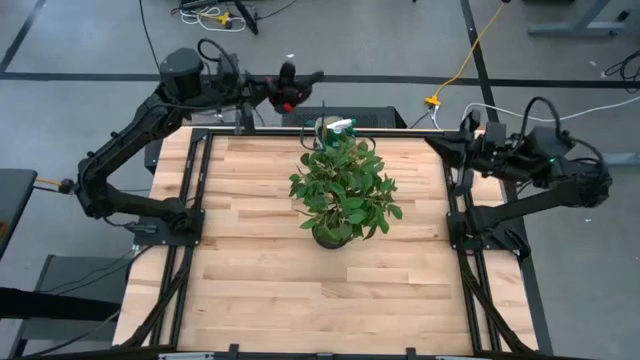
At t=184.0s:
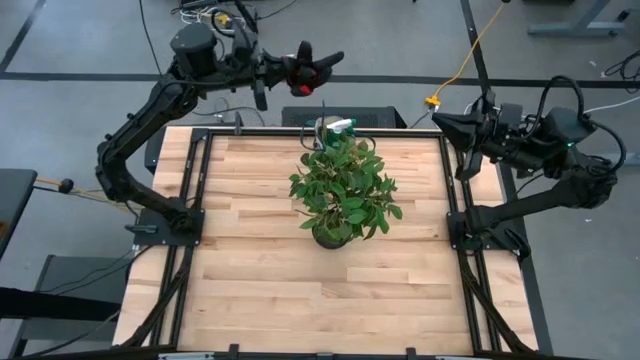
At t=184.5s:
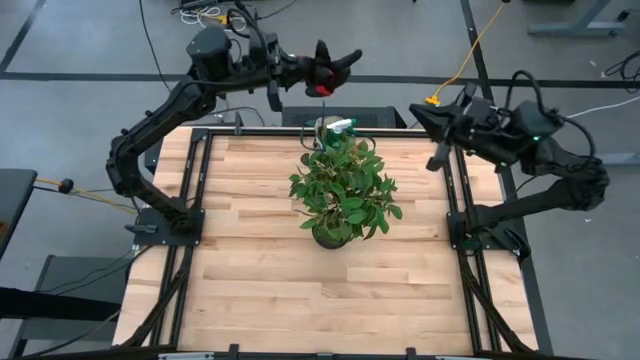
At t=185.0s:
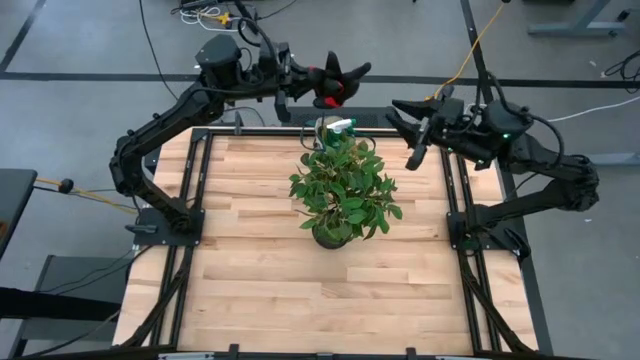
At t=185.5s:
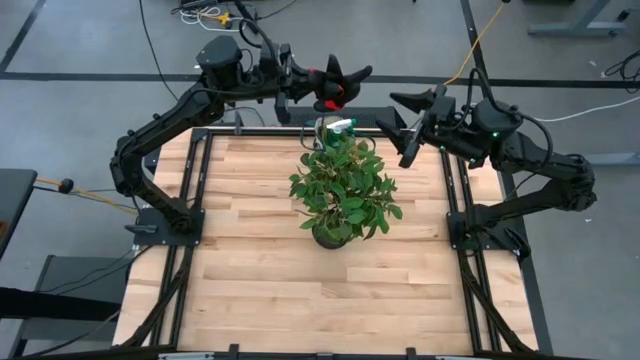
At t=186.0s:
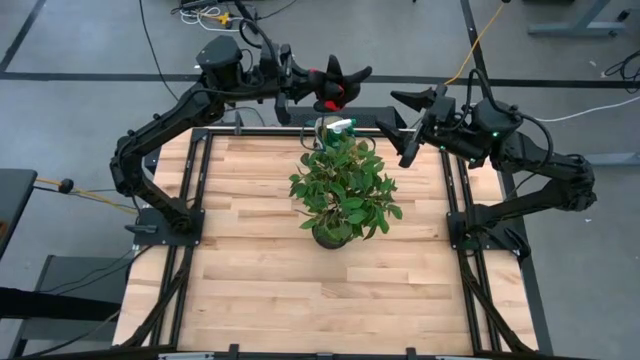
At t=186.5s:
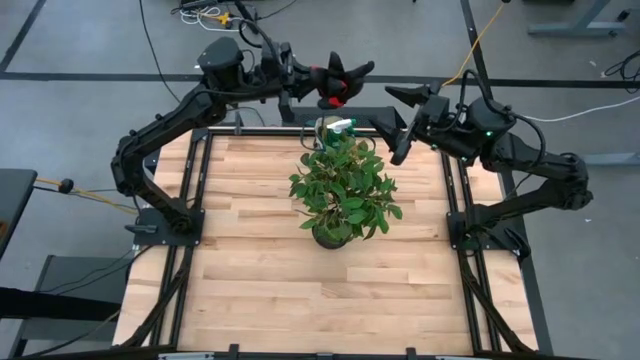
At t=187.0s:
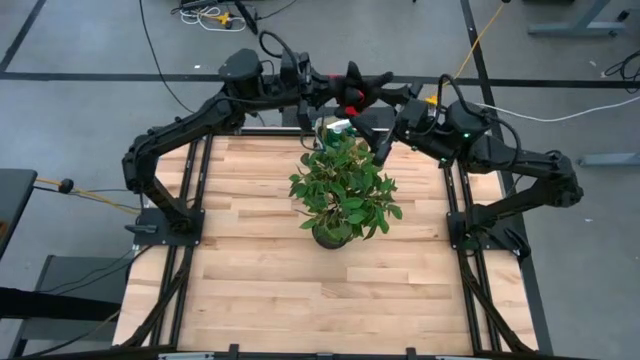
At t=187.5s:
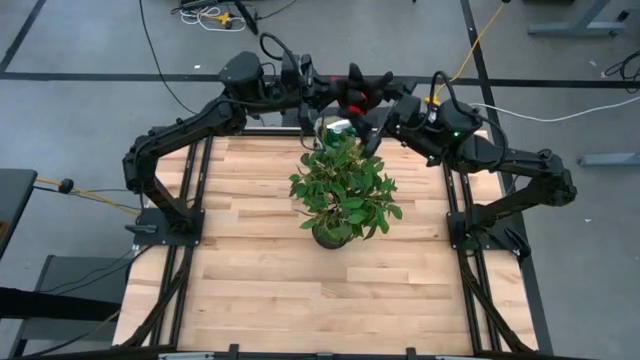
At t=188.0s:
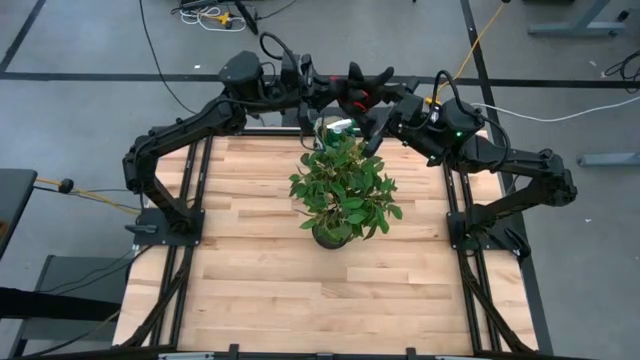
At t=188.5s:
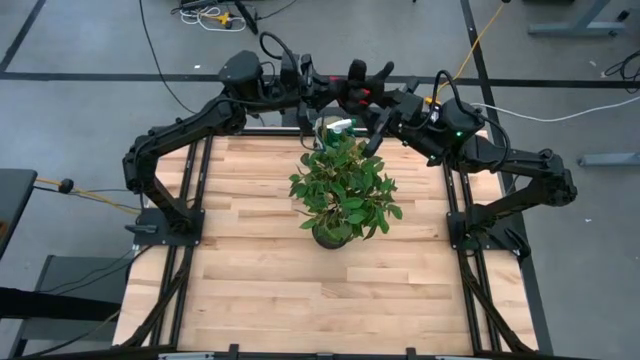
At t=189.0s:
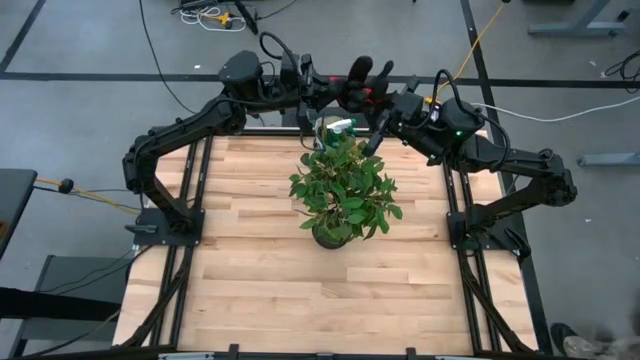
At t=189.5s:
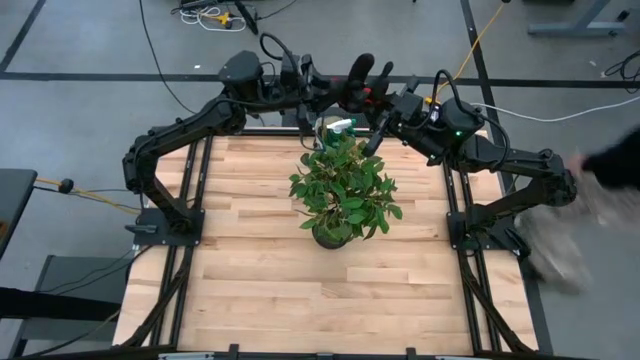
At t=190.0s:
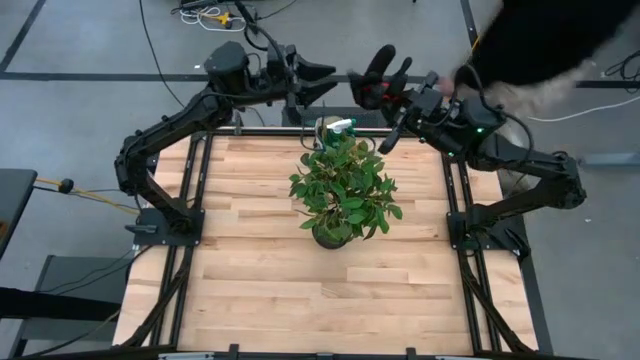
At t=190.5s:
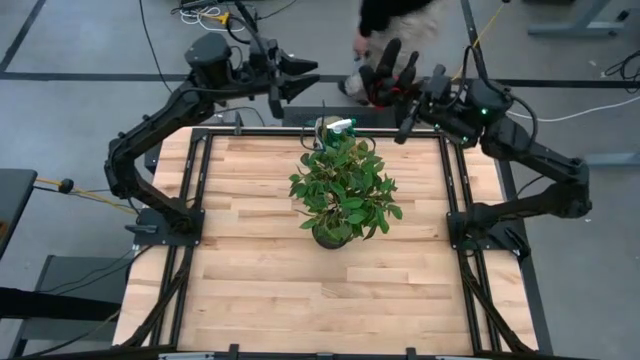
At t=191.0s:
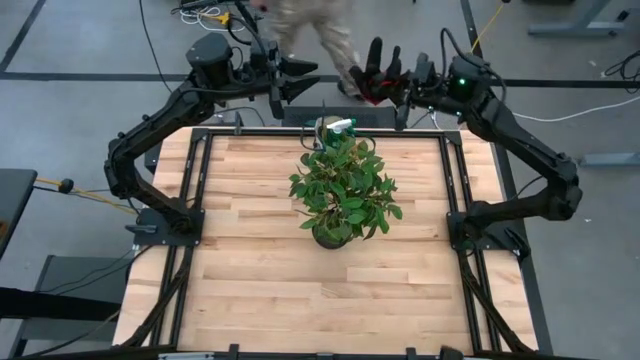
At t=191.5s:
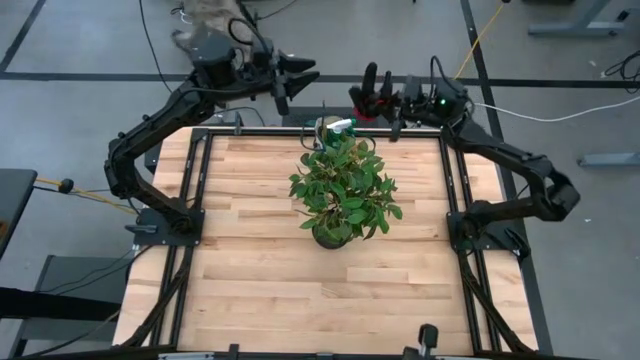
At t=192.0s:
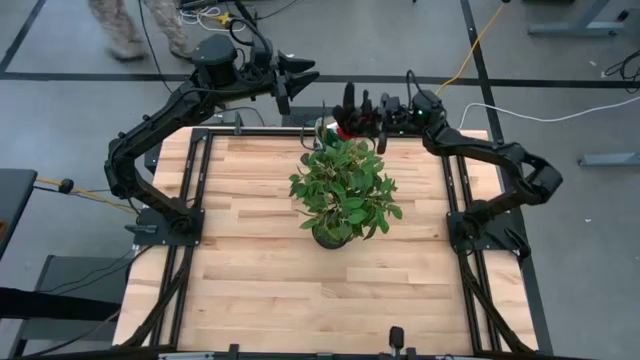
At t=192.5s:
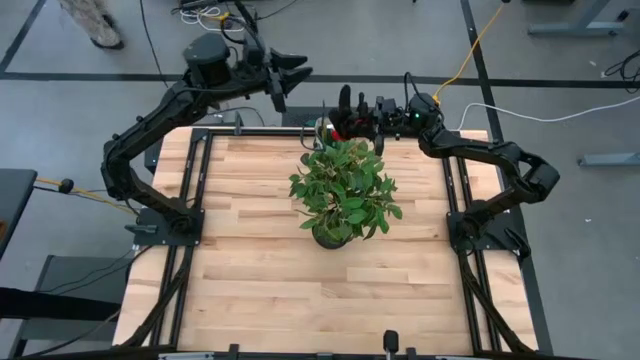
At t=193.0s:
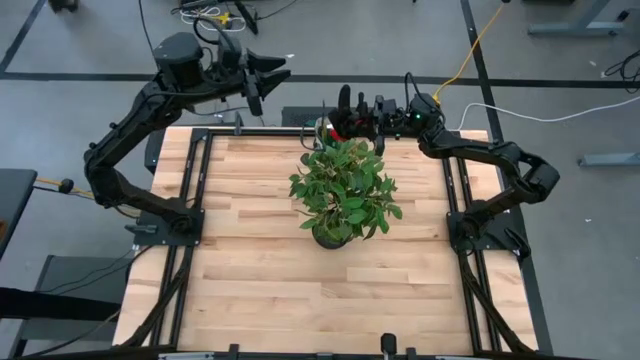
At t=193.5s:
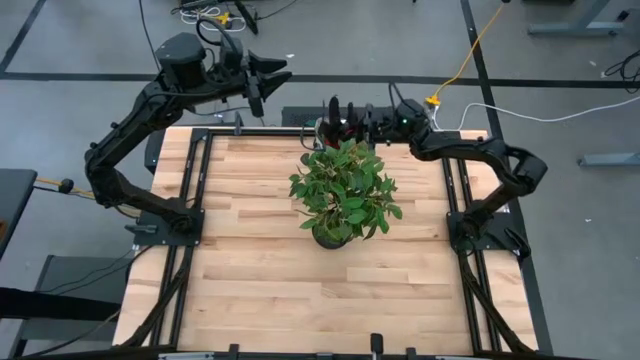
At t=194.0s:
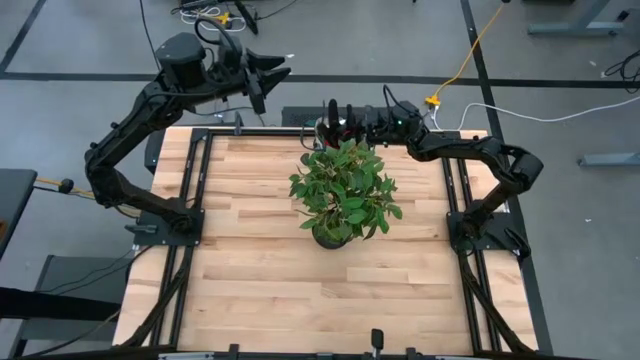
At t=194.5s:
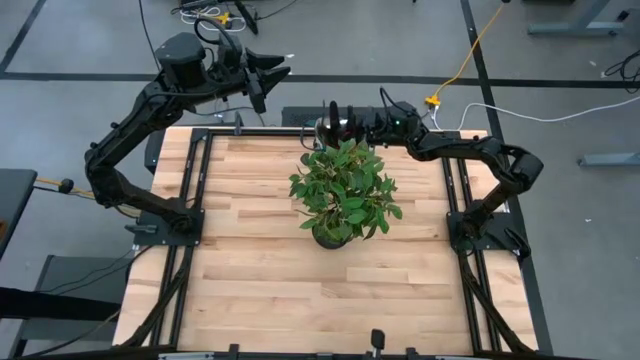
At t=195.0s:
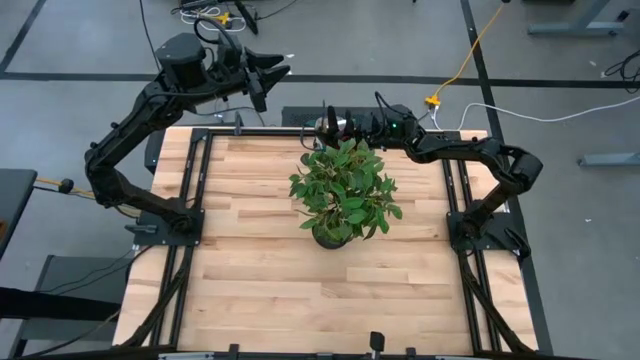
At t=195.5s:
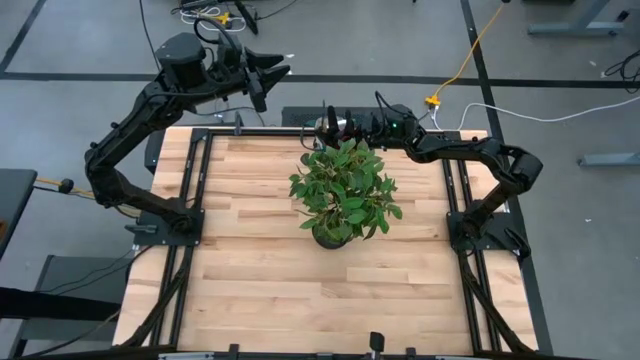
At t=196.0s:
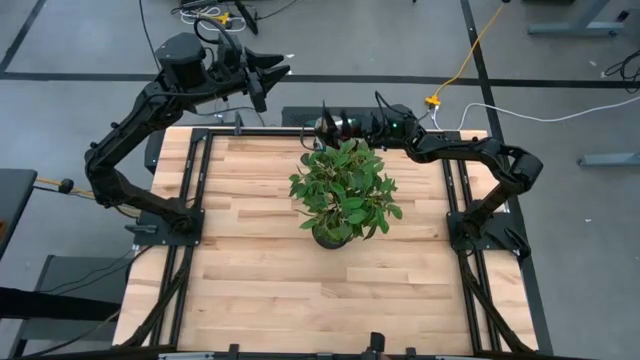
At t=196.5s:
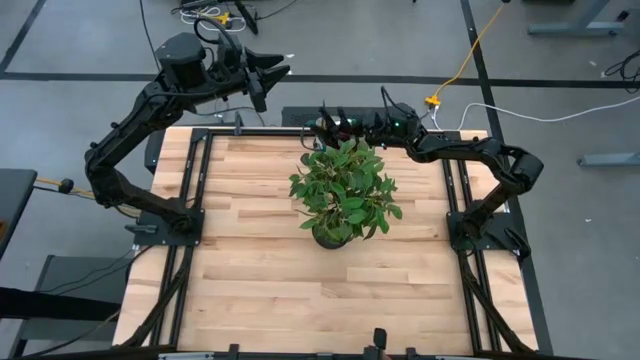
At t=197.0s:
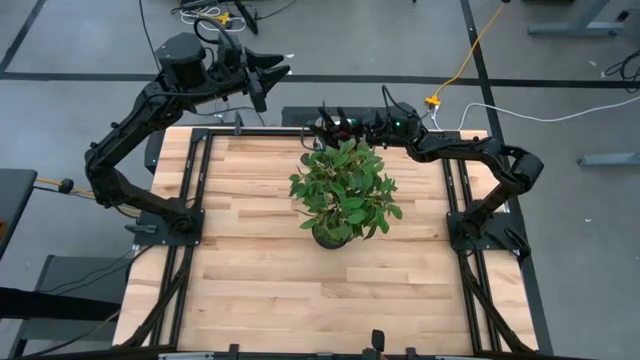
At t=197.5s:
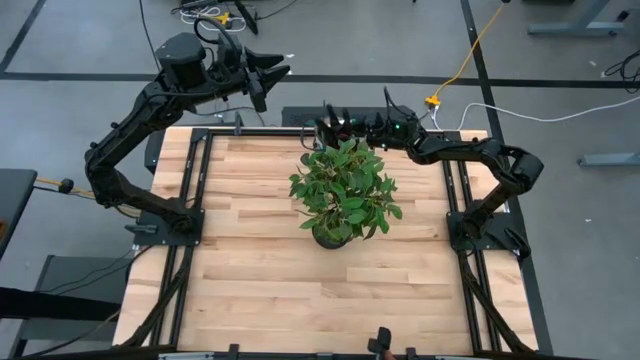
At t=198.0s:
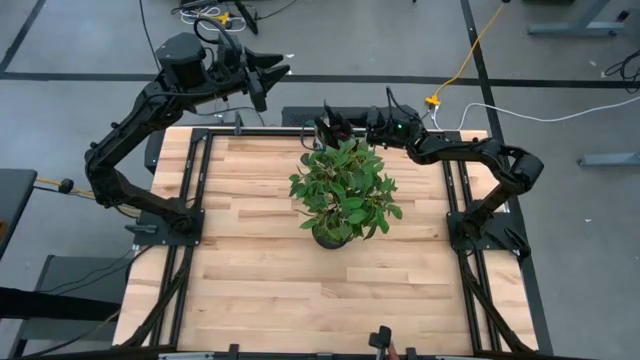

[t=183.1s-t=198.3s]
Task: Pick & Place Garden tools in Gardening bag
Put the black red gloves into the gardening bag

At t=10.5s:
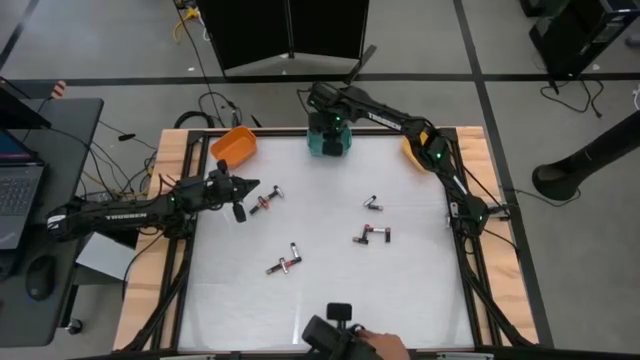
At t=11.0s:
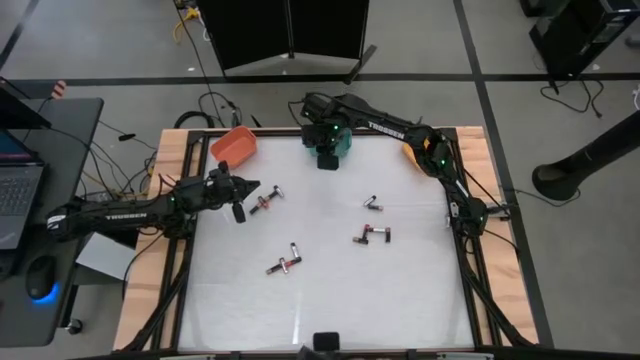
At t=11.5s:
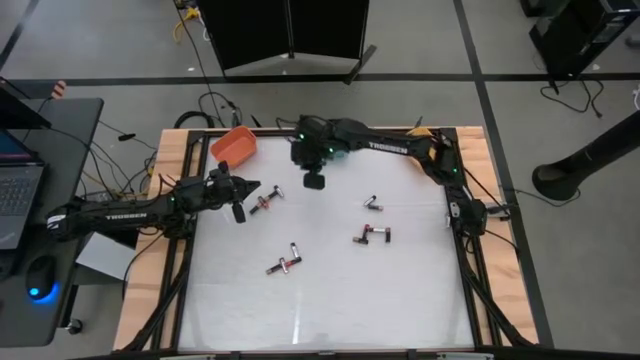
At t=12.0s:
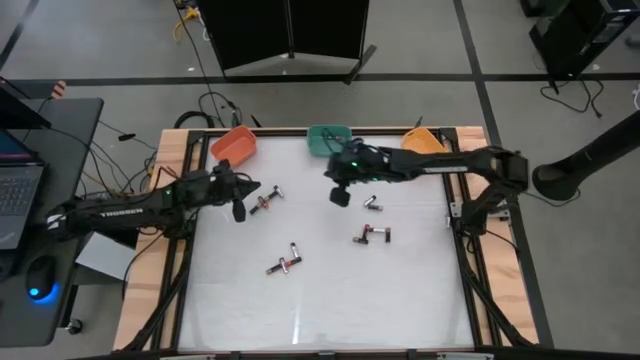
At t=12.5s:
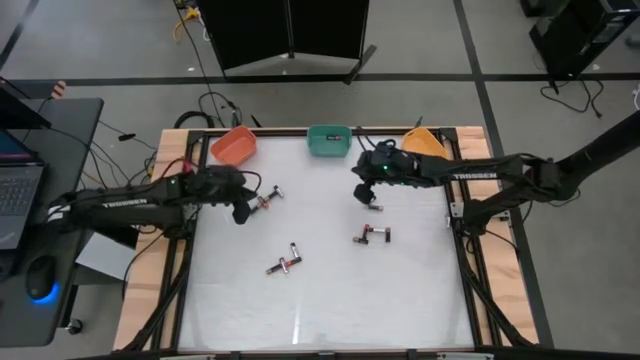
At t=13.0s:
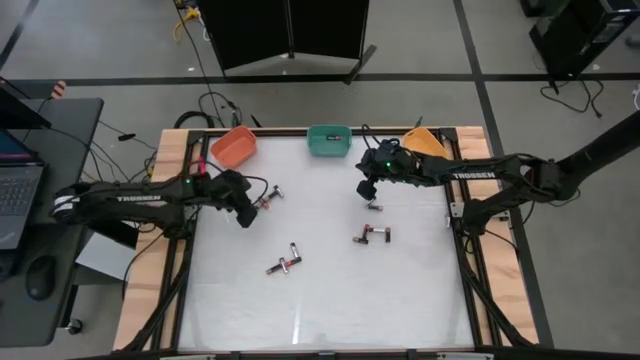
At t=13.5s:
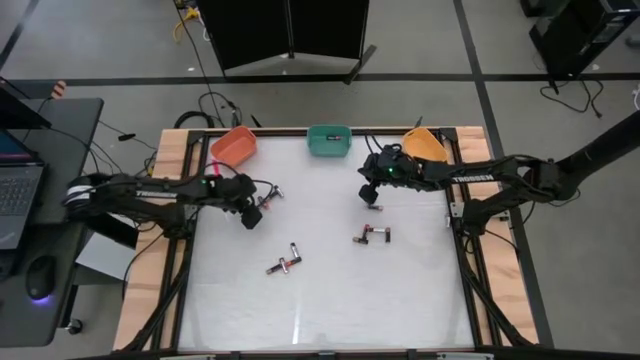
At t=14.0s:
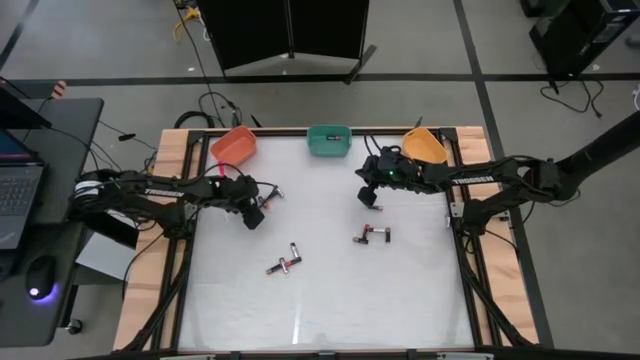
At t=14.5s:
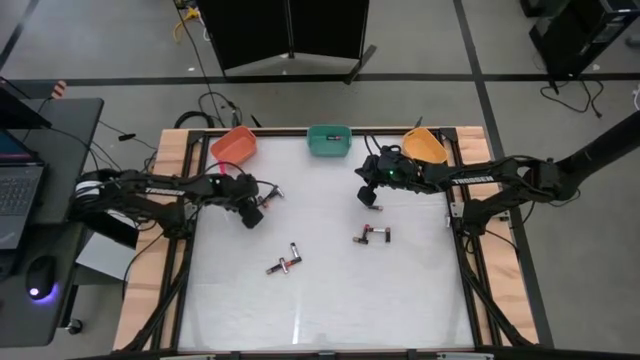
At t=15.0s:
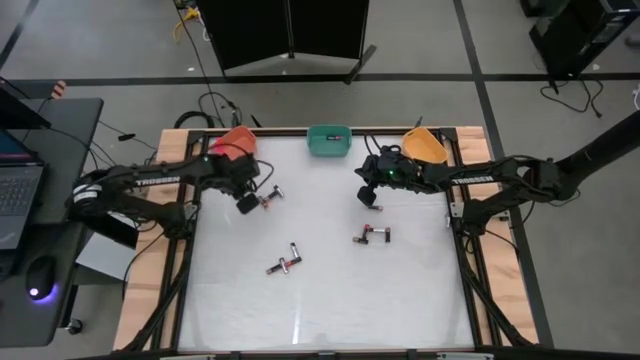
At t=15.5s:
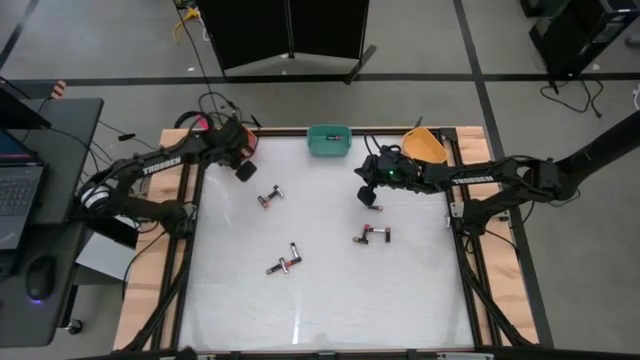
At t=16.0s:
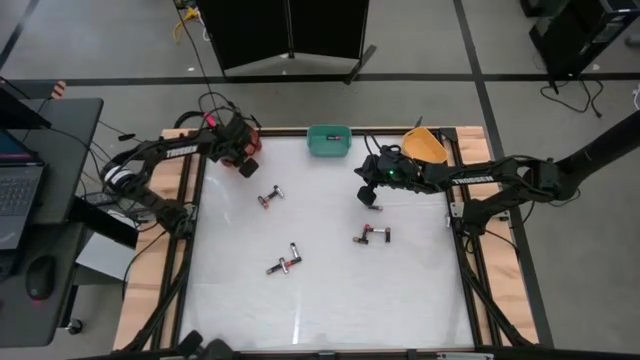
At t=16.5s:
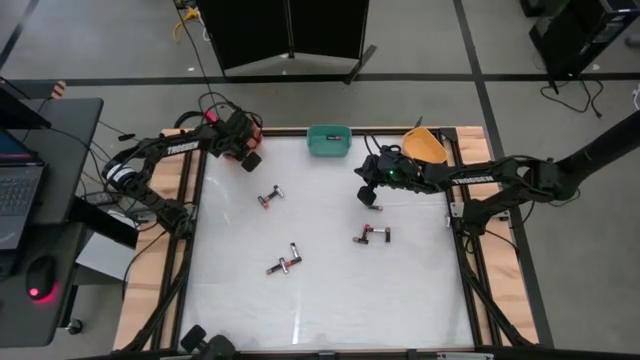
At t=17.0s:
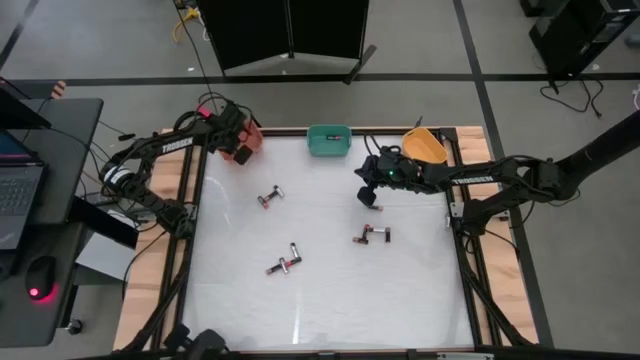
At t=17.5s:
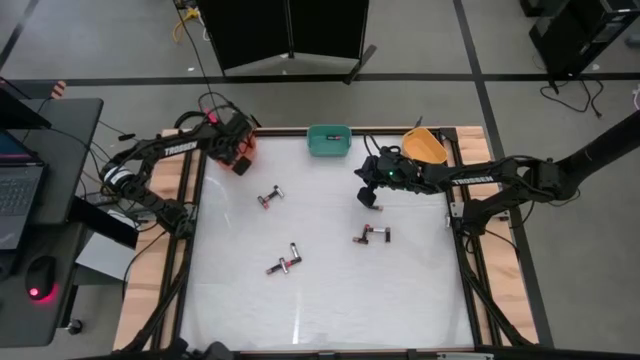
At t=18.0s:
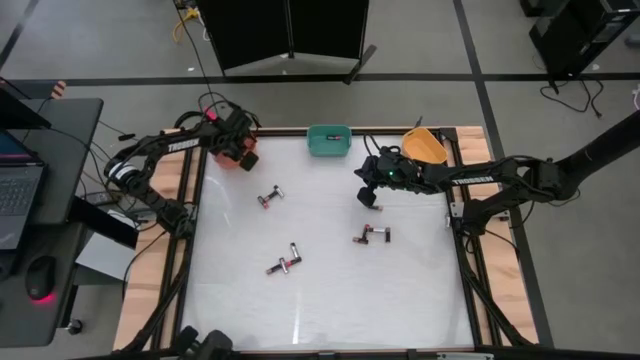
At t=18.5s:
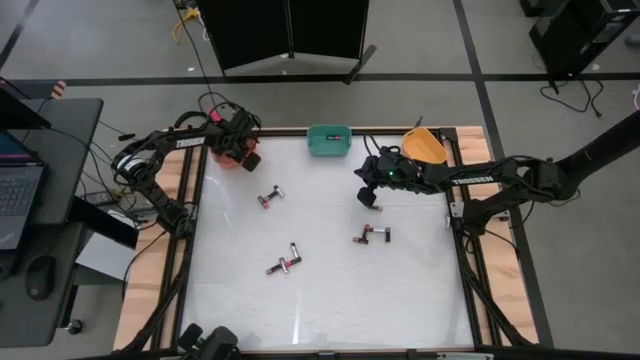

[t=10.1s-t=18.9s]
Task: Sort batteries
Put the brown battery into the orange bin
